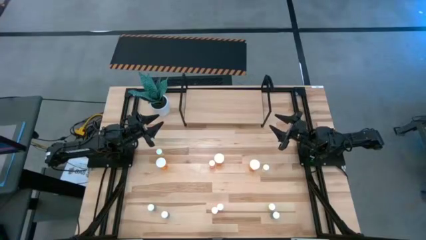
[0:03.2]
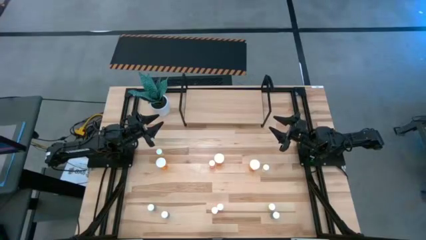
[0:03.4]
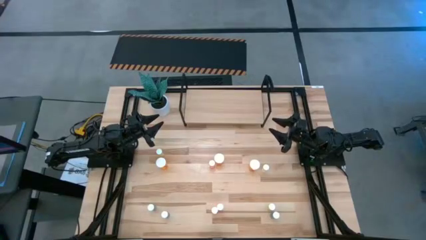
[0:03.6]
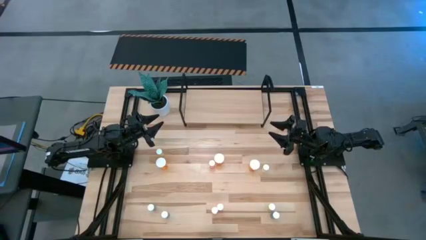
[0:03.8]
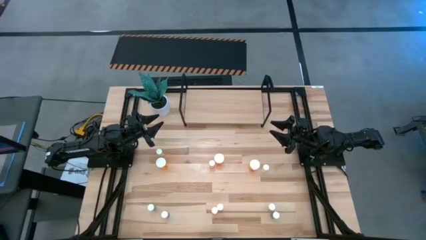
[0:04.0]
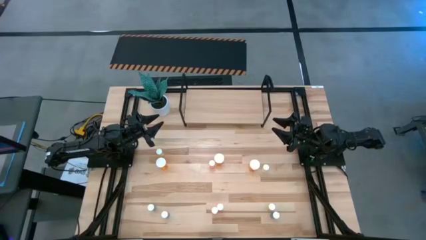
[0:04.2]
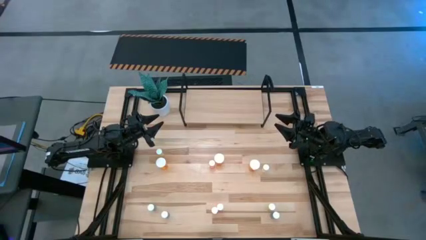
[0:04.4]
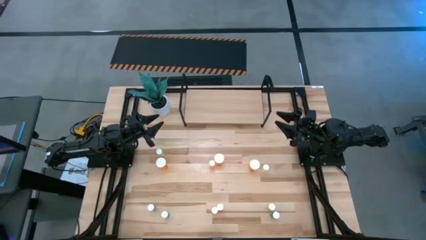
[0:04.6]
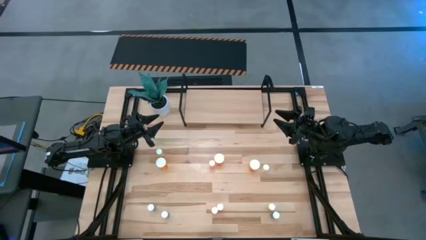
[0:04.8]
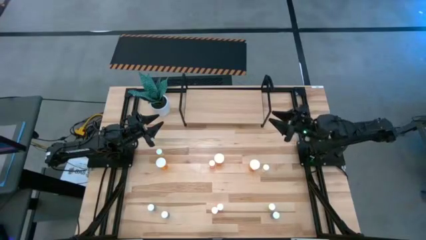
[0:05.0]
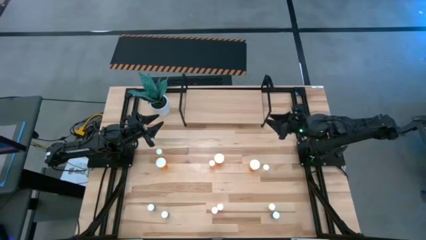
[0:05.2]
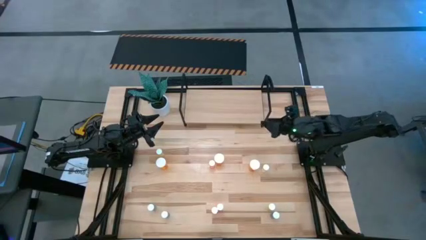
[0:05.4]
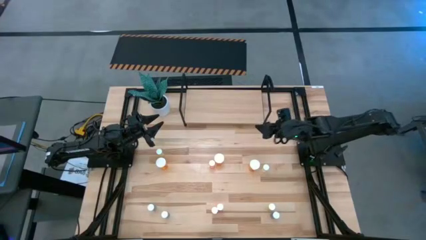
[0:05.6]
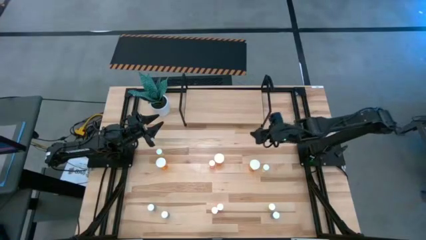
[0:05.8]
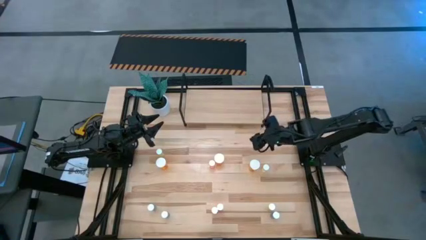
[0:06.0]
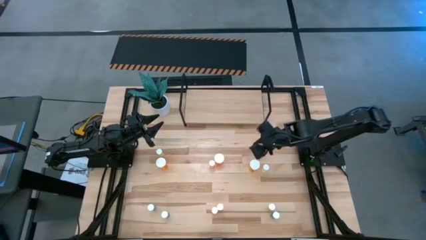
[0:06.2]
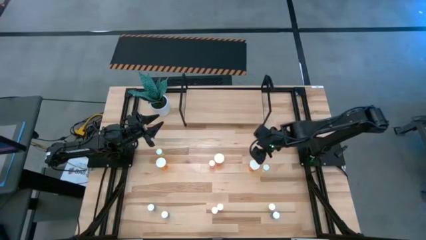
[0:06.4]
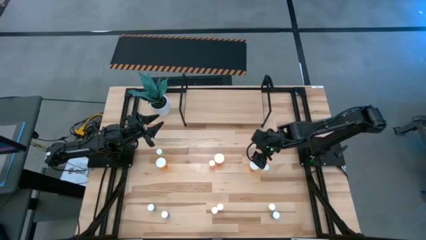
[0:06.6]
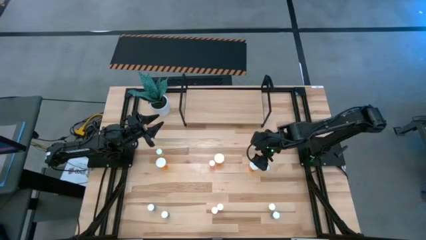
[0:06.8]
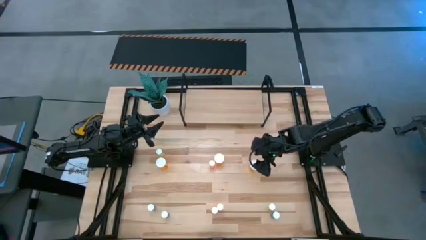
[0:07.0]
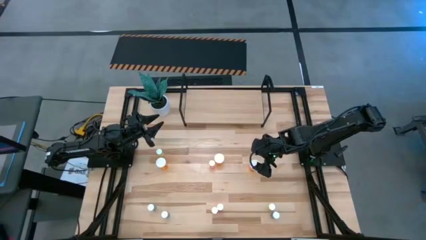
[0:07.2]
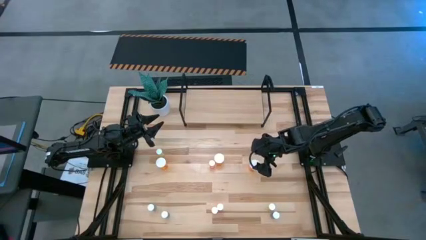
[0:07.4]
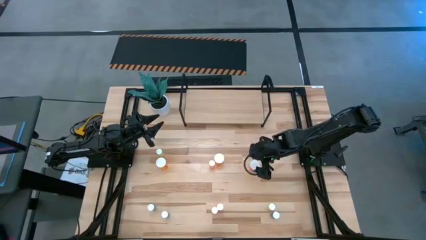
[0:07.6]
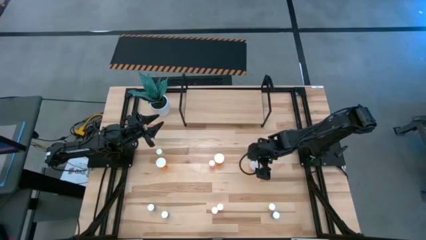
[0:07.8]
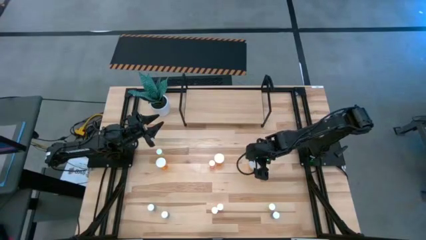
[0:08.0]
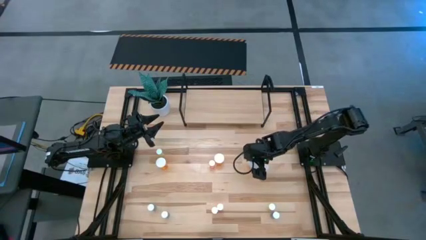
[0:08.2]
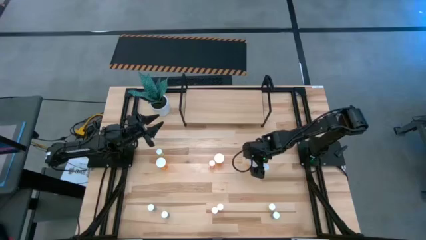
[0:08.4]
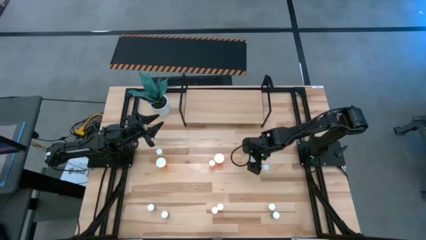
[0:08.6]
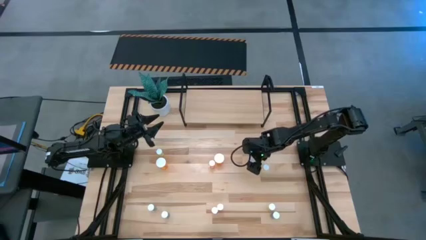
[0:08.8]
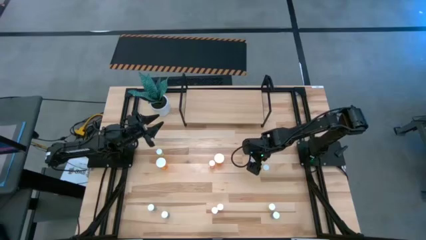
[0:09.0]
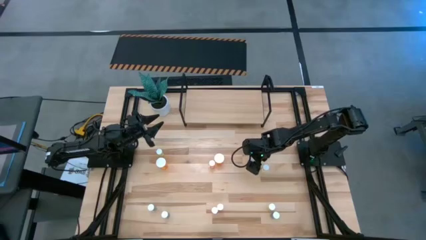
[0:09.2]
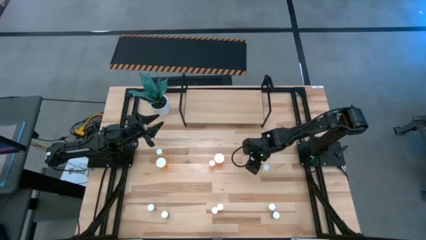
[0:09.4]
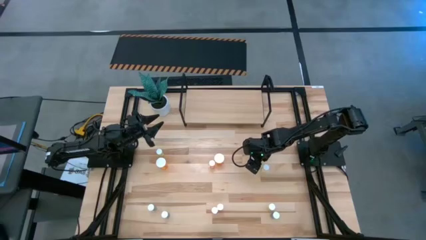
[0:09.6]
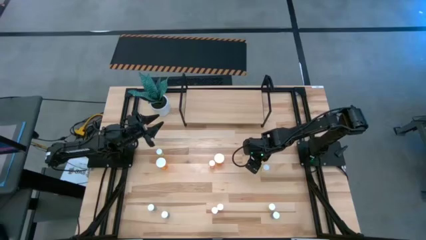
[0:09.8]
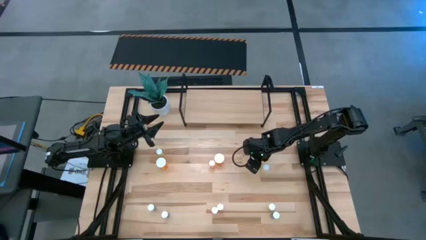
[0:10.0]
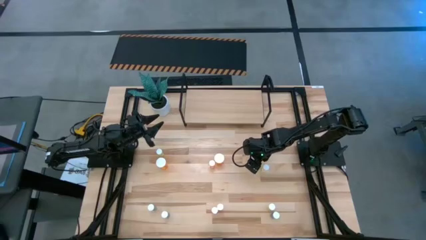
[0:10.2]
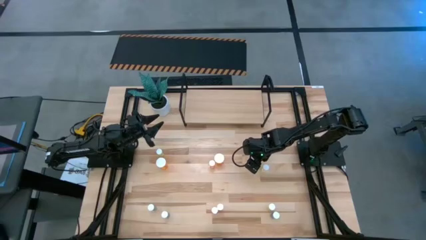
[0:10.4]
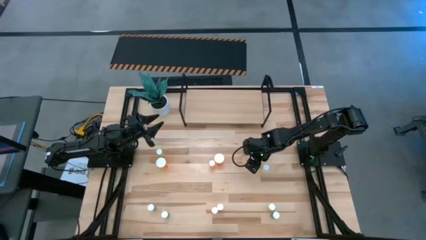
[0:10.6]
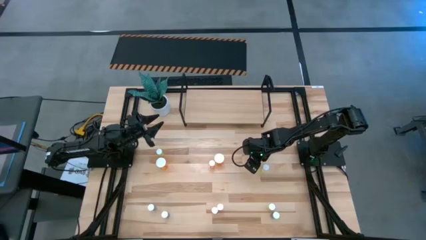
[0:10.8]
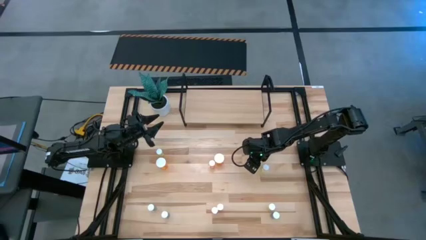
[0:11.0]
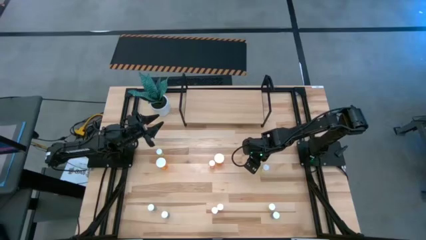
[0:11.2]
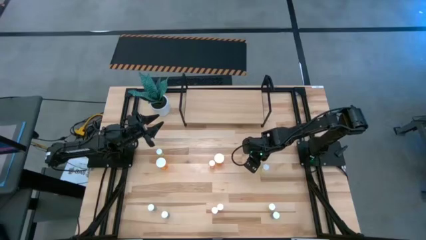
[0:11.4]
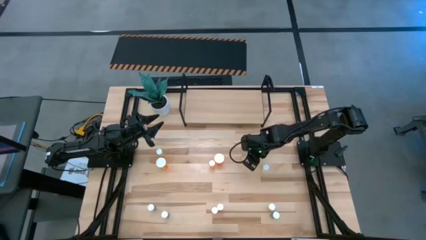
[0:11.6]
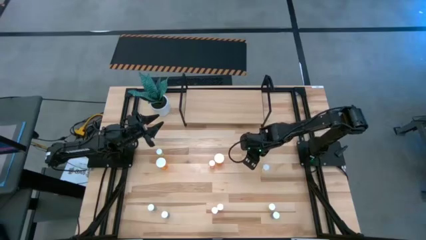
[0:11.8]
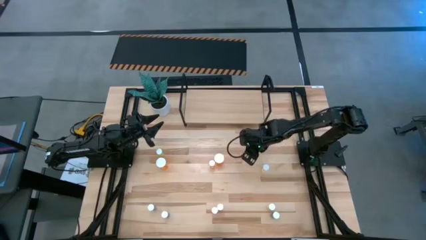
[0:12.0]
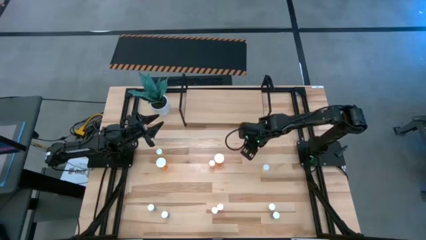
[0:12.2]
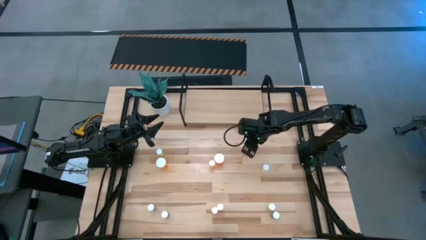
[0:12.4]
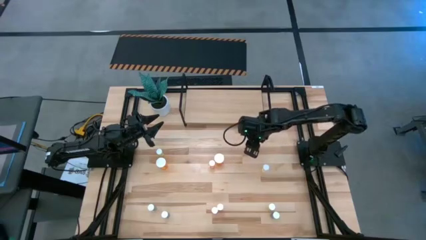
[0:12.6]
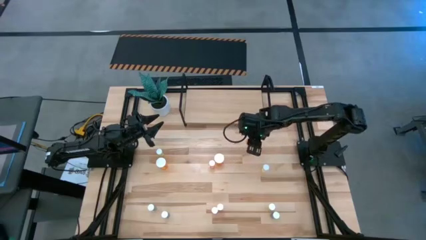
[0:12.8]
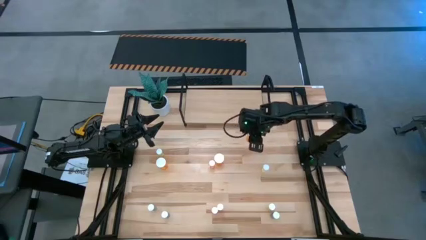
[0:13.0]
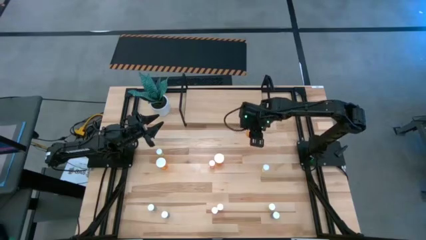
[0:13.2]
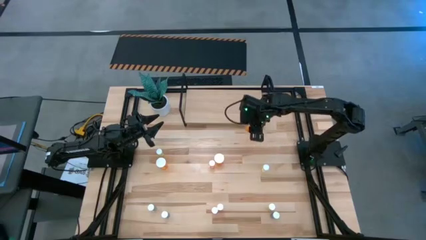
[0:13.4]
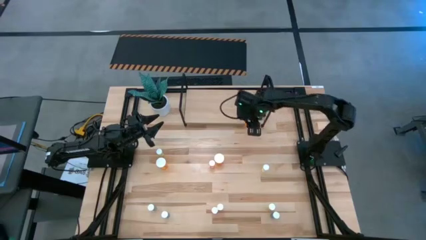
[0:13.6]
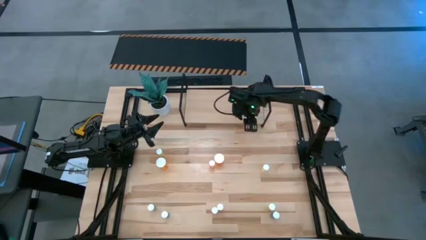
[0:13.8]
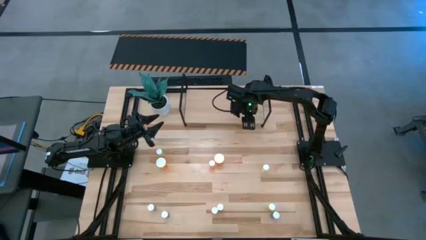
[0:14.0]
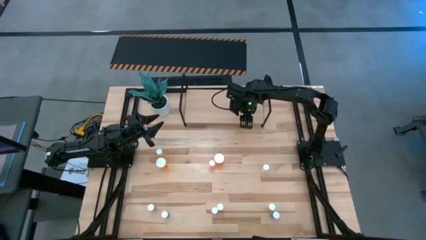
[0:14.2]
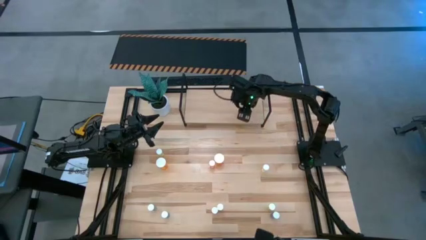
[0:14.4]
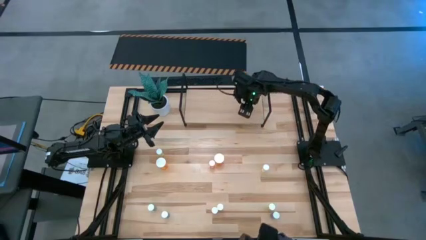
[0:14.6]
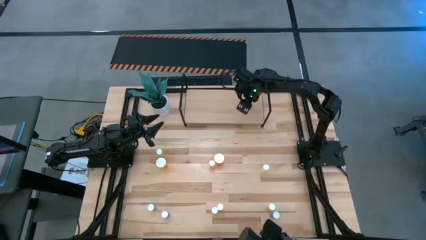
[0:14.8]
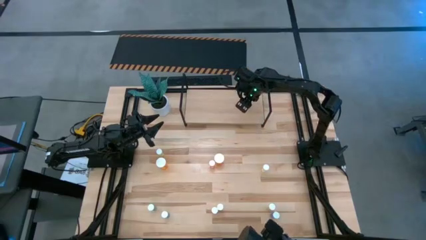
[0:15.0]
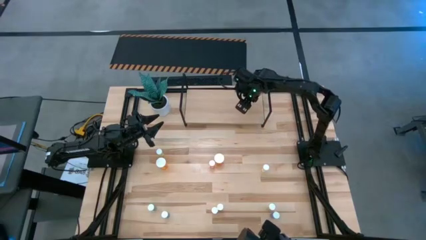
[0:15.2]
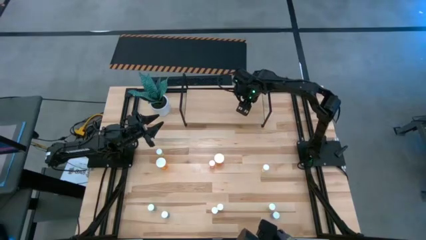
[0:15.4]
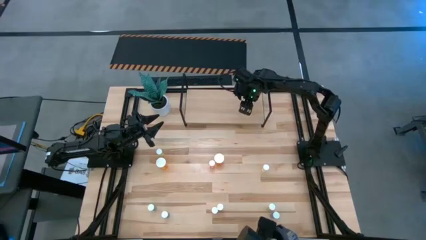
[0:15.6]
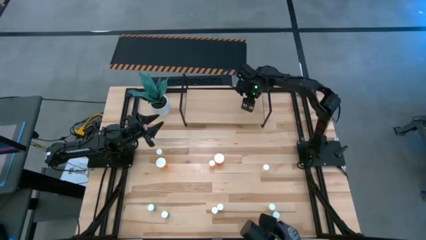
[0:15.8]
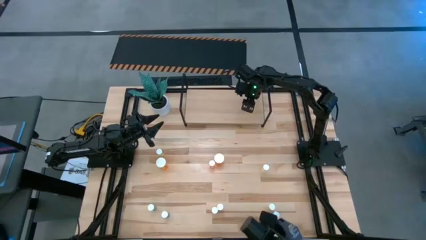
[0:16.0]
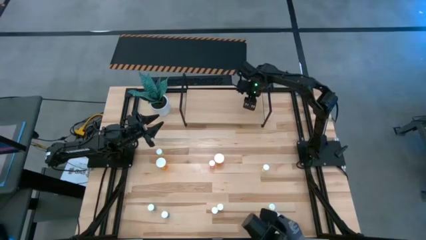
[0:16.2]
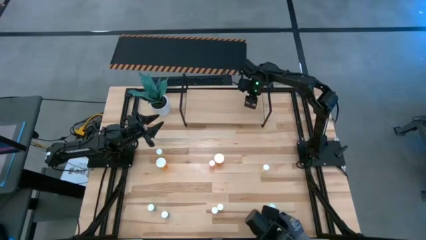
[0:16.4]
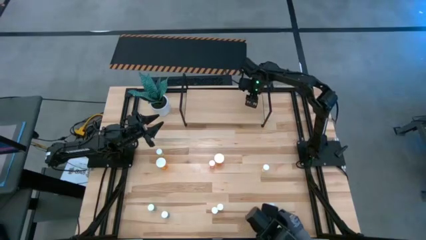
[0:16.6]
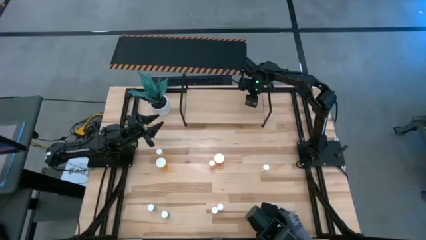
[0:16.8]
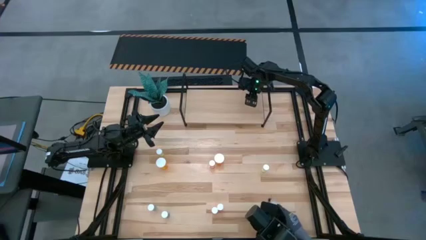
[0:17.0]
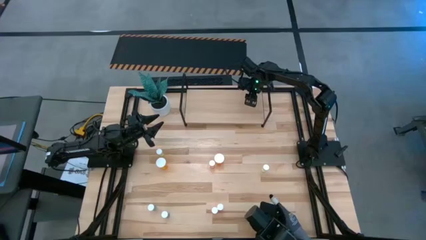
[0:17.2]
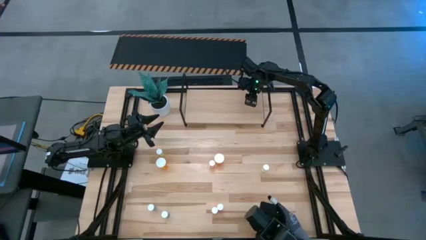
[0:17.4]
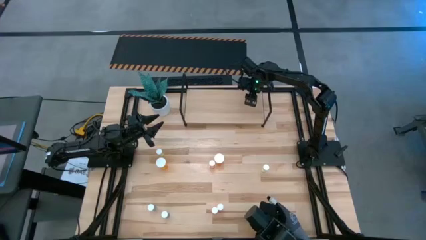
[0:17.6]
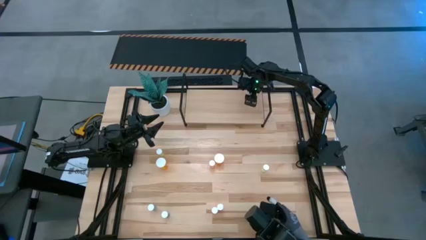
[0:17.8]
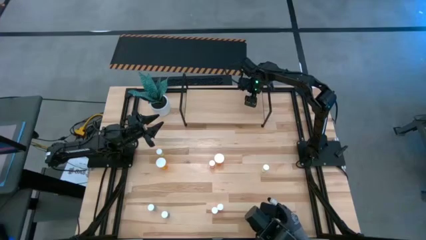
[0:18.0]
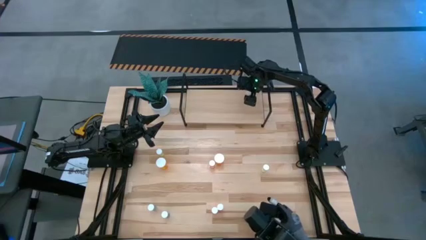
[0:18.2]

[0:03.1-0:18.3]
Task: Pick and place medicine bottles onto shelf by color
Put the orange pill bottle on the shelf

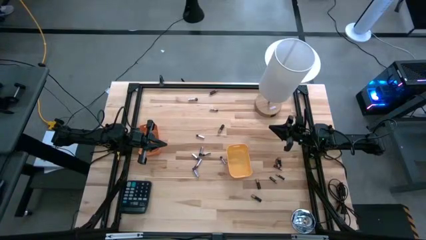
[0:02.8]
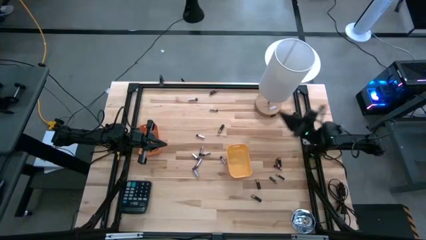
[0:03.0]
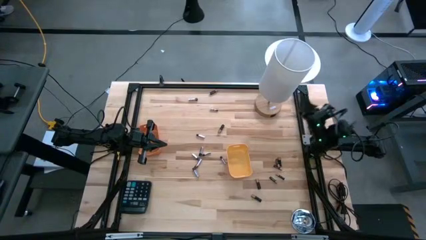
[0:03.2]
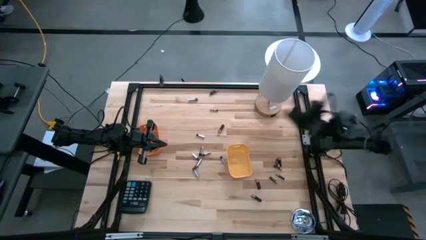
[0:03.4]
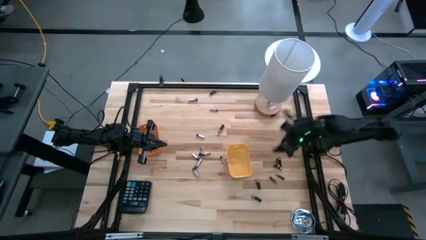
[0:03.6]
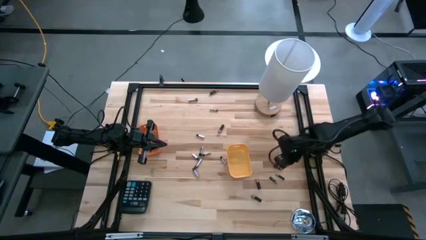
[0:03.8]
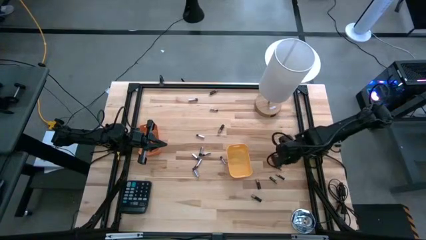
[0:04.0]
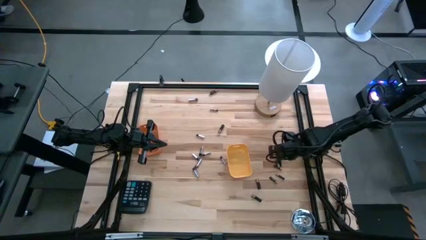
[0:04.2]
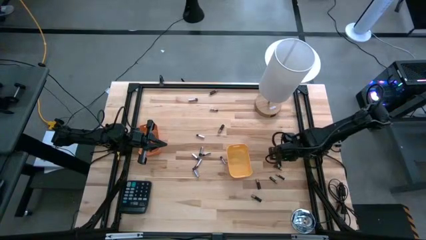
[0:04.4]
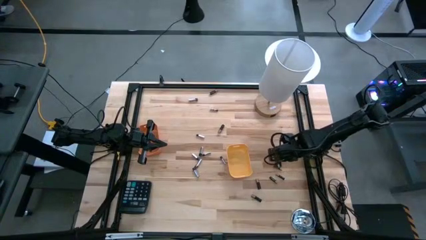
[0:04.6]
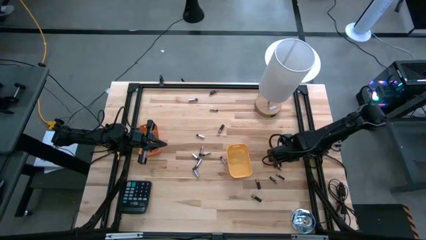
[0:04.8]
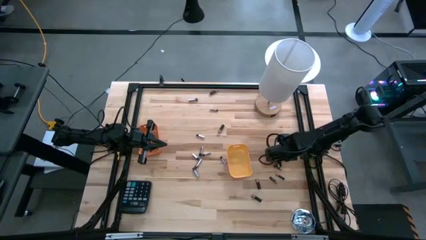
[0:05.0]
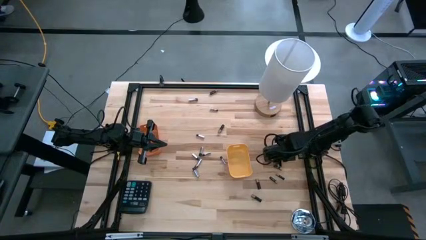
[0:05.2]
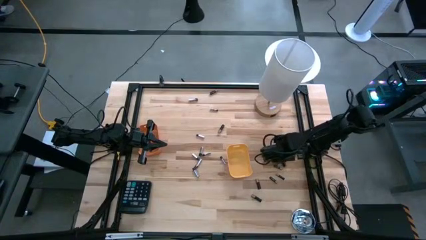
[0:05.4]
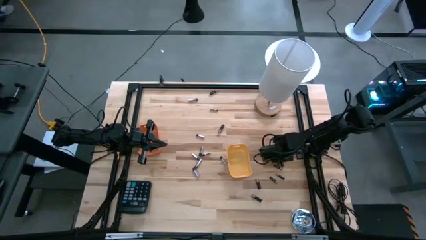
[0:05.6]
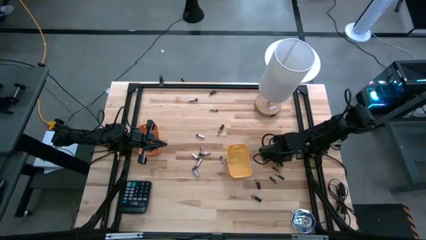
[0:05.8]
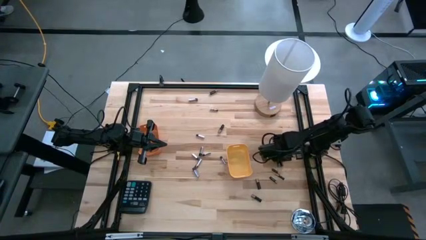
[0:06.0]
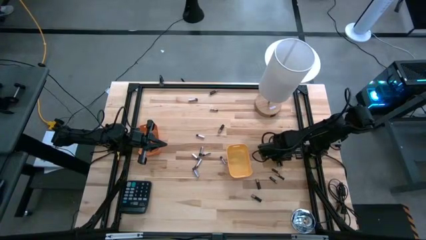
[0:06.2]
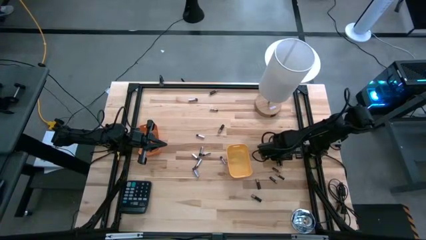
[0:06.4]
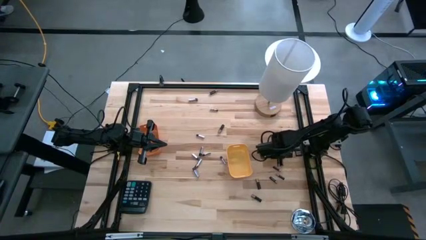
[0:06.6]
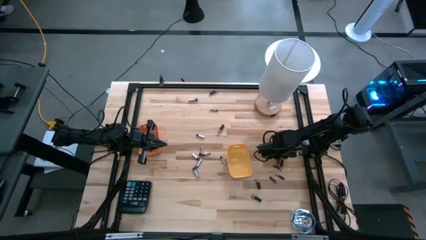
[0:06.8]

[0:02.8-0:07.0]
Task: Sort batteries
Put the black battery into the yellow bin
